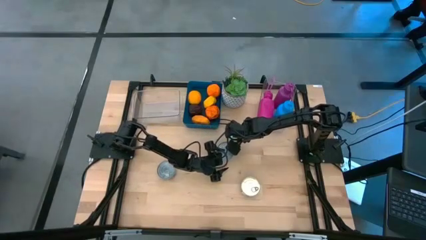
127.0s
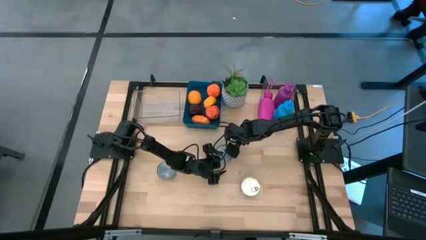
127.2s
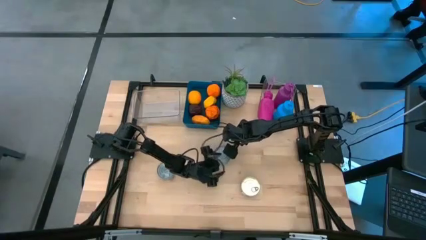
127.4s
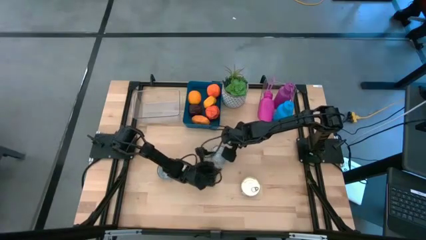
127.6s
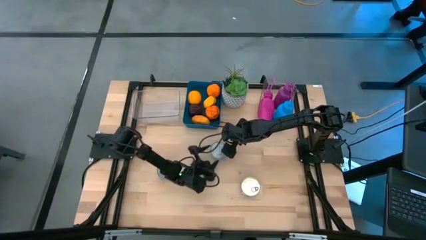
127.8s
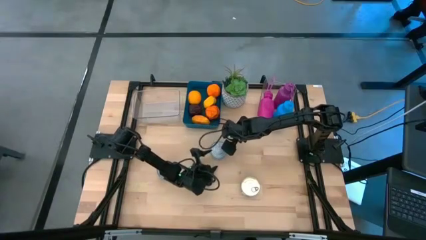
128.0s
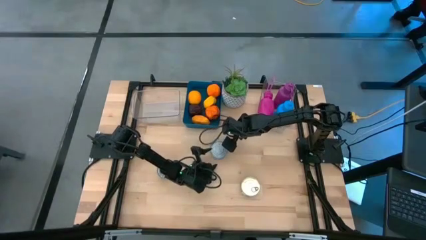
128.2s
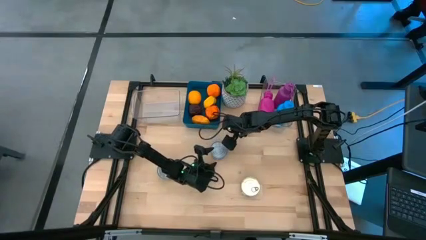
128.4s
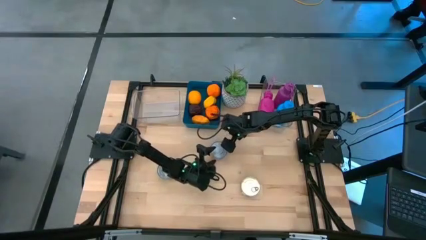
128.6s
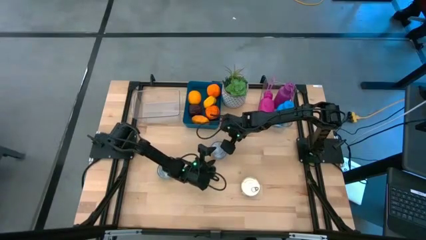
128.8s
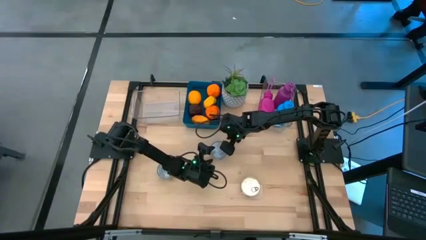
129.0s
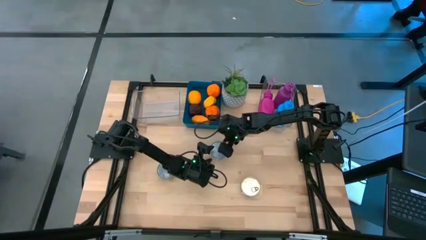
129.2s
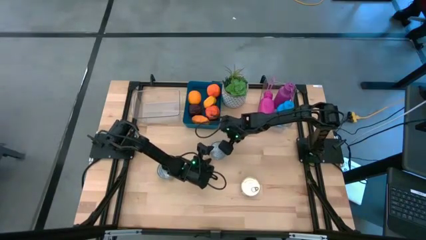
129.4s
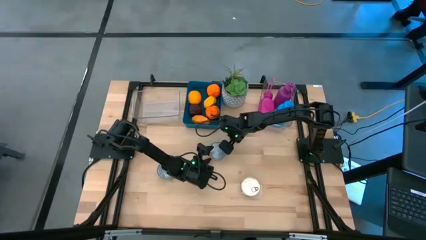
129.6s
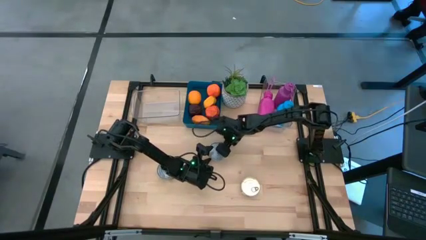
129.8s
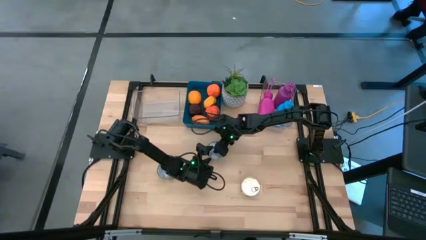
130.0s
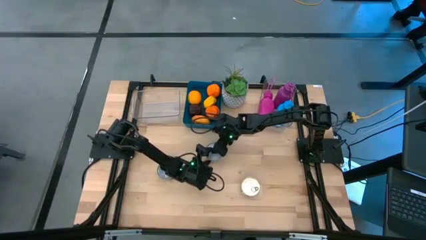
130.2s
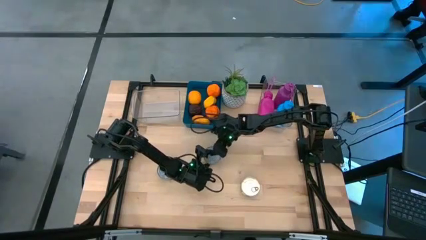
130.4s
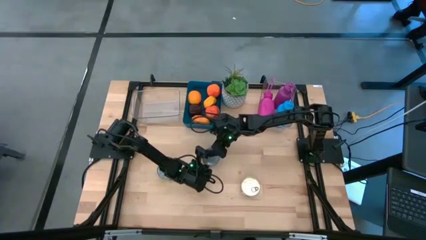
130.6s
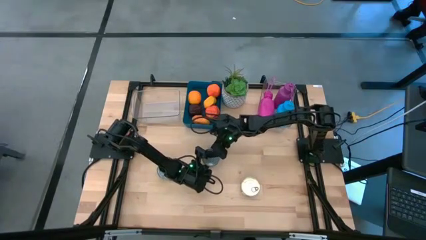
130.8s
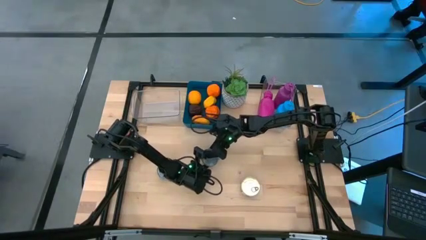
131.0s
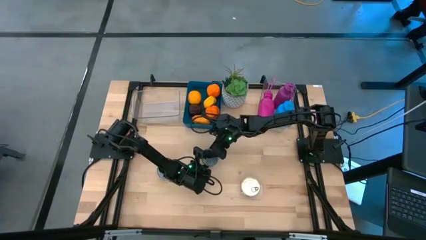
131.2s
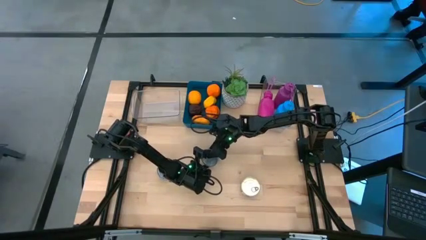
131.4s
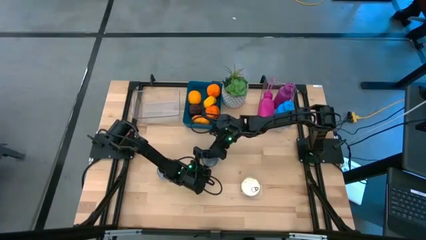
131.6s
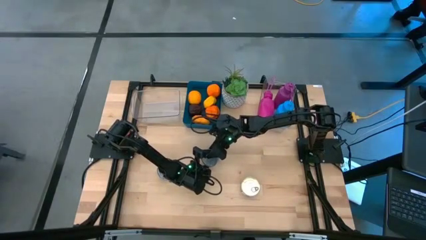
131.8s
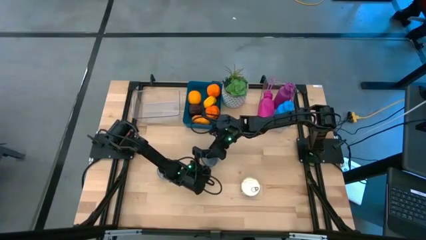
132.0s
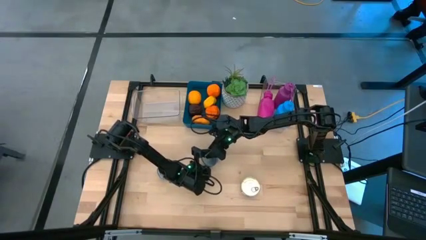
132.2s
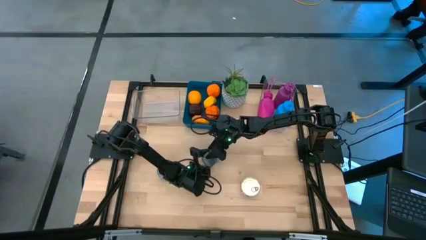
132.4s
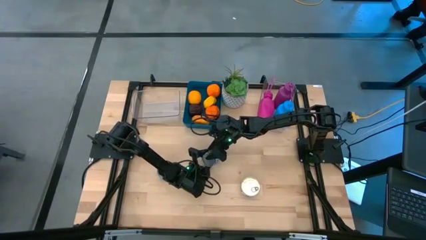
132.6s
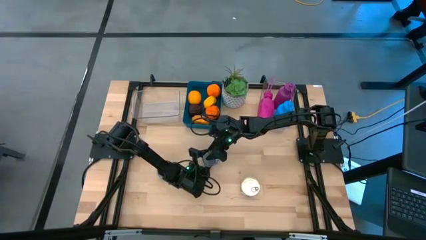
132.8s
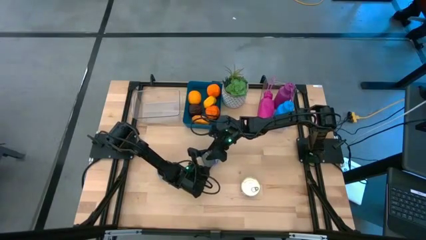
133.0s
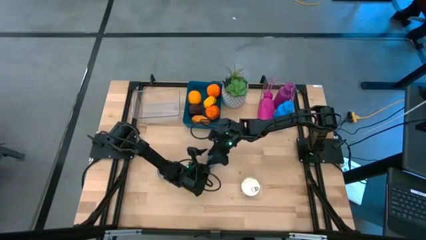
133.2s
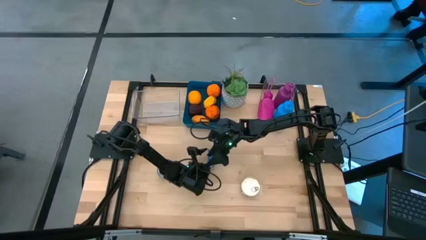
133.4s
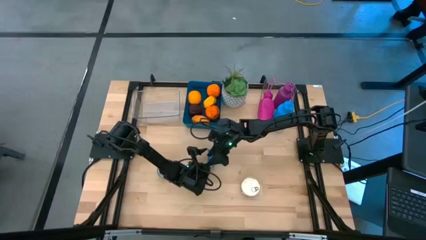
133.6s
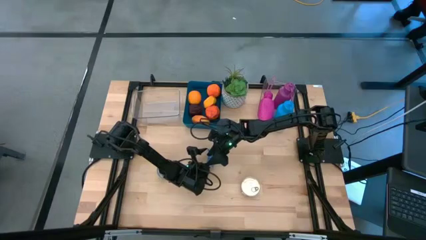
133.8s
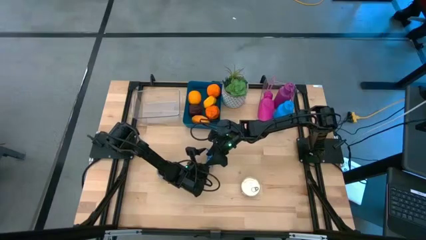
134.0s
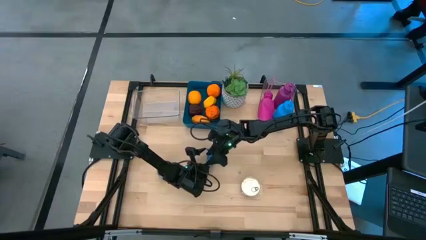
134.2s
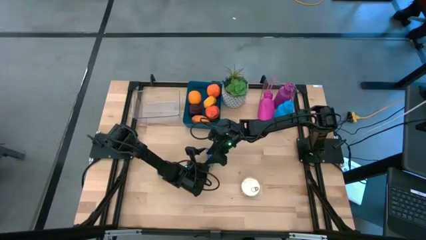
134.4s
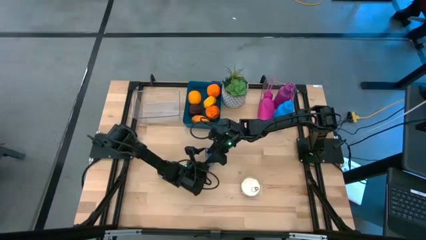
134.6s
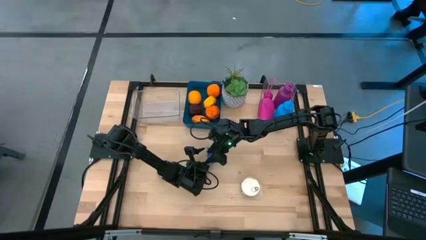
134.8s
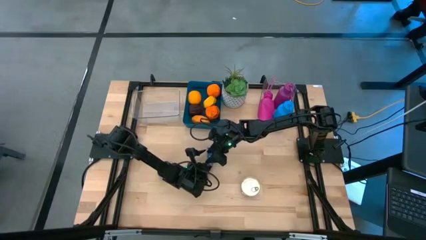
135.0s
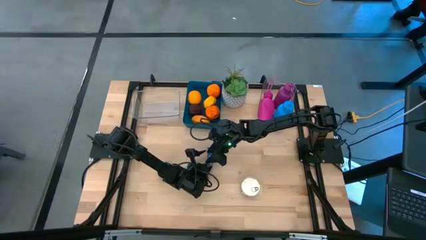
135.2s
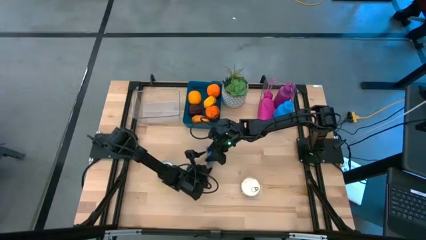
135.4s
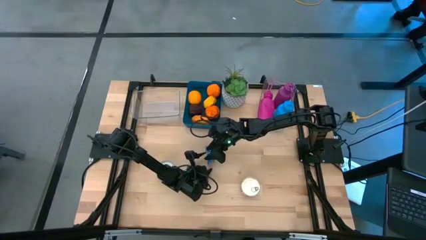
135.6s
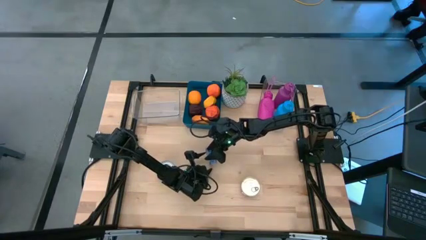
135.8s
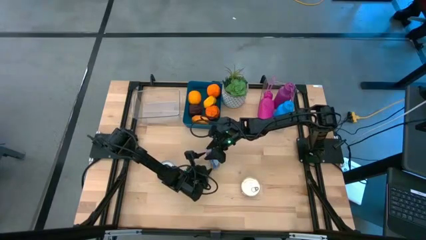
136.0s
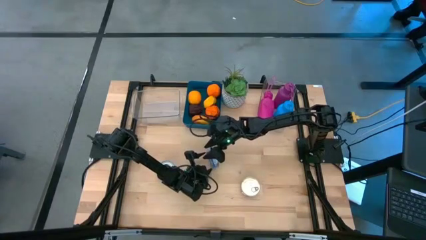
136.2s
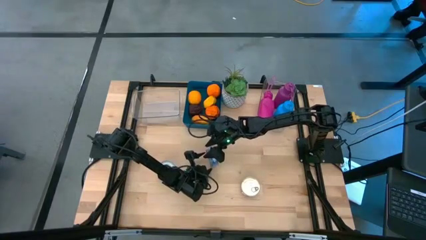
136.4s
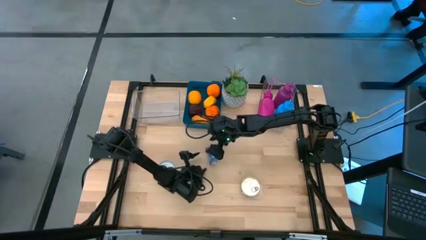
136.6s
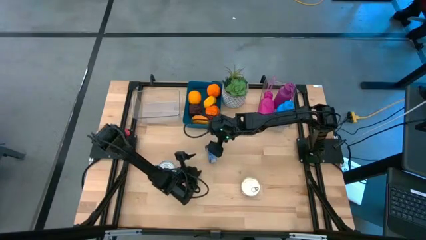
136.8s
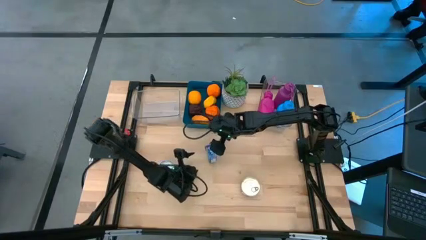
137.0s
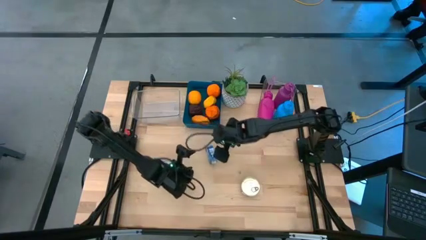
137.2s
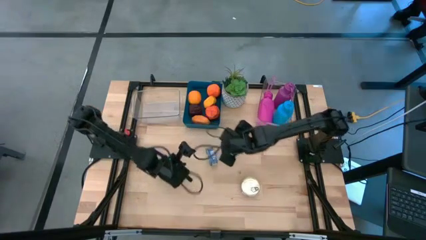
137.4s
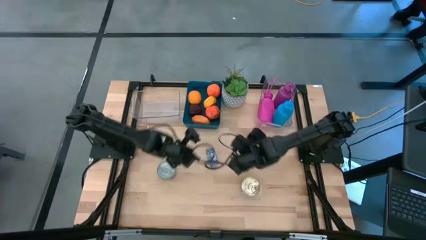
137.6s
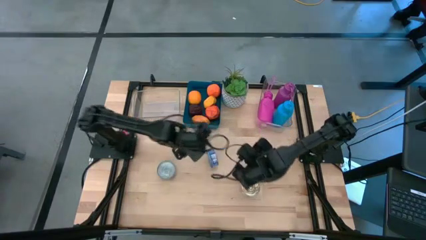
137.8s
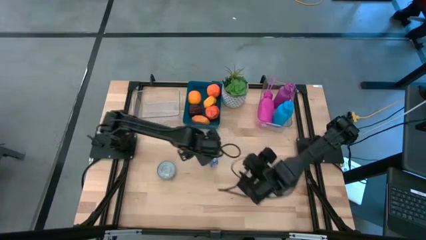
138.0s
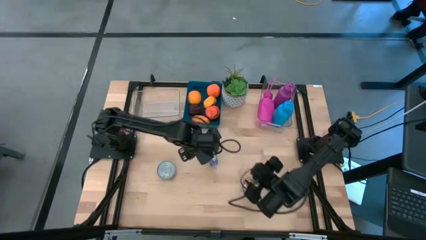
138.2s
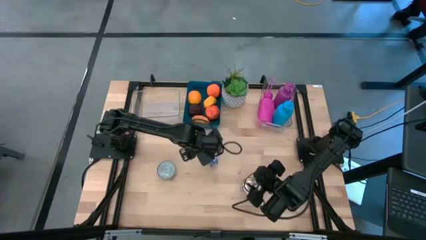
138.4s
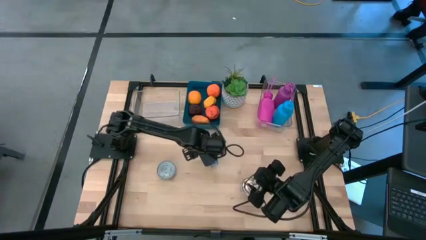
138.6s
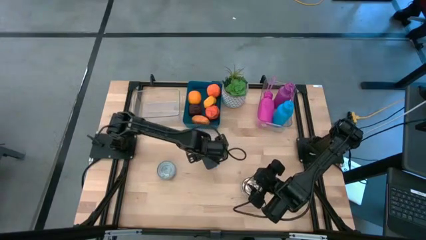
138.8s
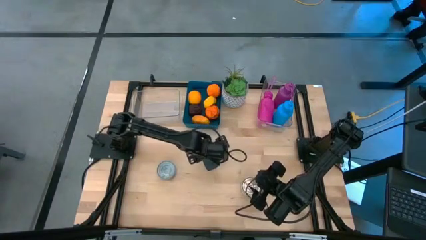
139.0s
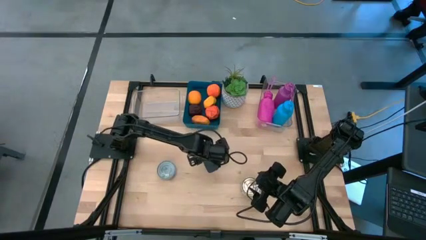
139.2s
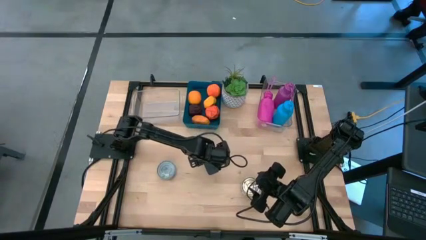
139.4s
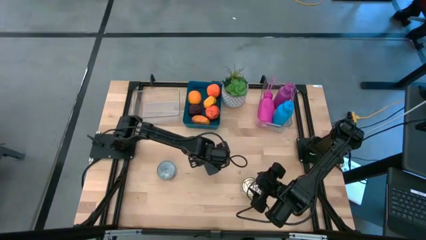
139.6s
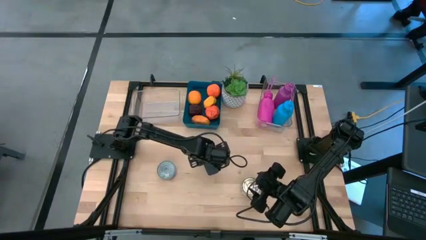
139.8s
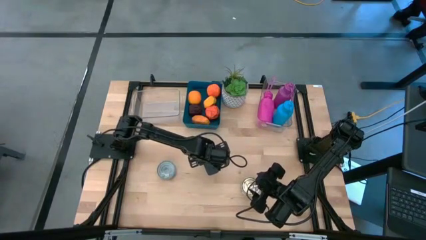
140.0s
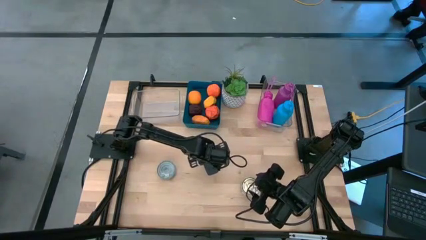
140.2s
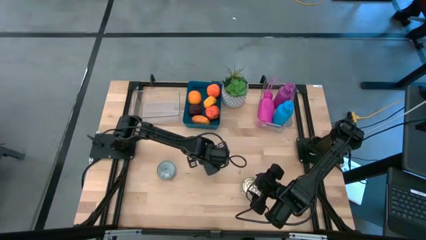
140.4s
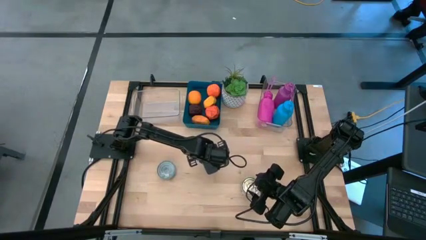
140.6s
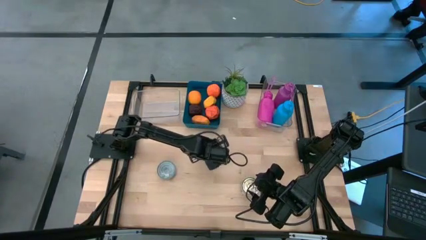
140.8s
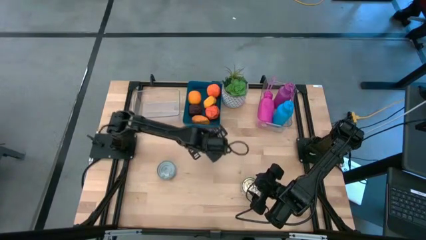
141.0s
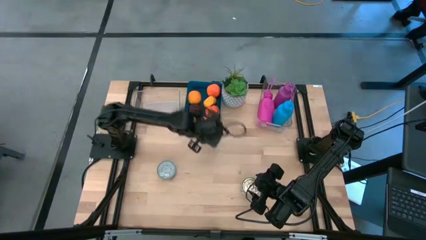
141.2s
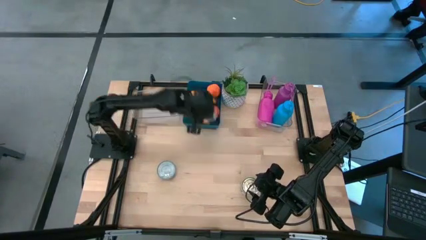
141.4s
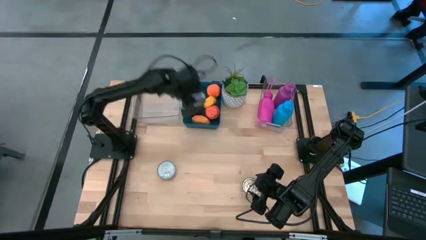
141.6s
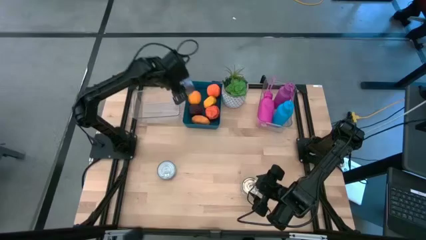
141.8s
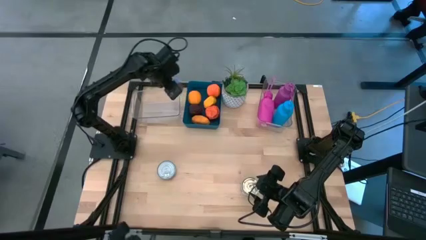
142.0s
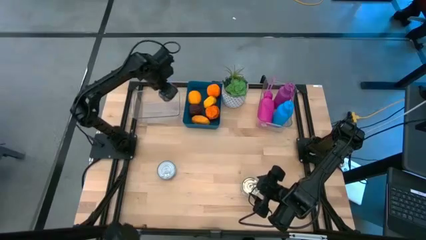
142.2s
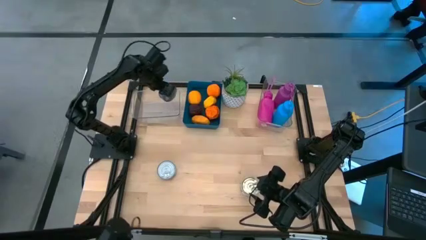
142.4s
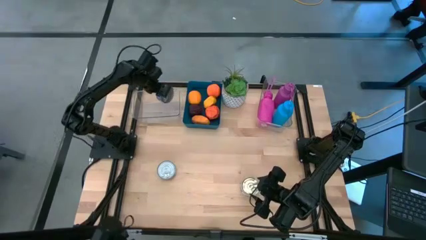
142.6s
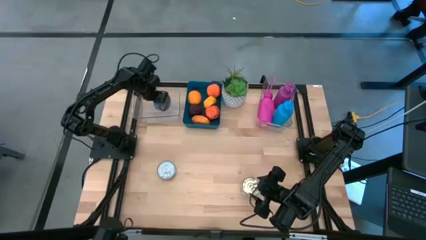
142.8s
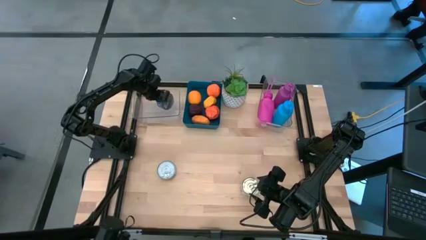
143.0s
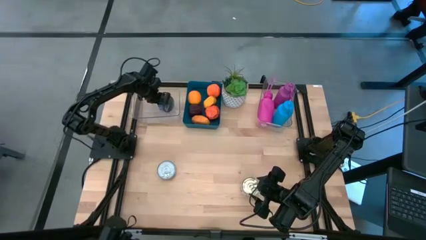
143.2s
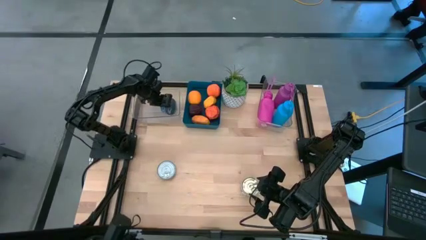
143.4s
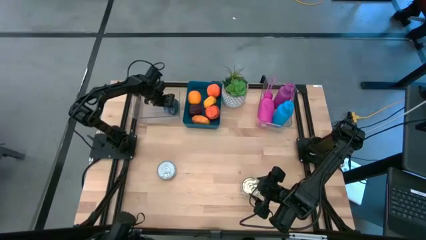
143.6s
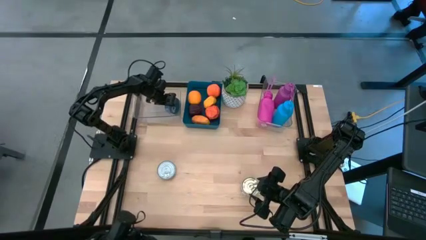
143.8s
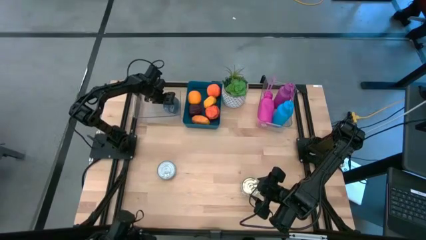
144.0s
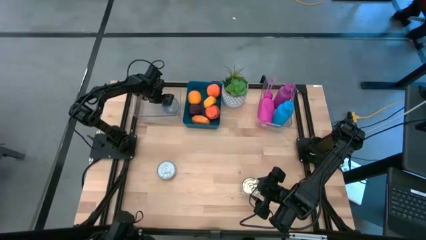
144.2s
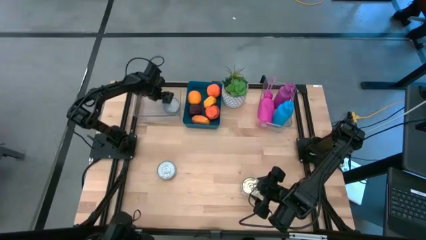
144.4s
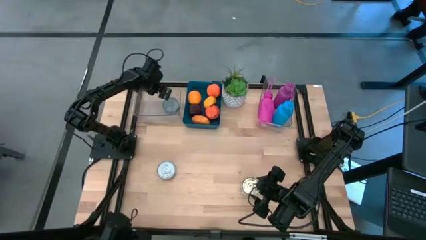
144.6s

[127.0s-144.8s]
Task: Pick & Place Food Item
Put the blue tuna can into the left transparent bin
